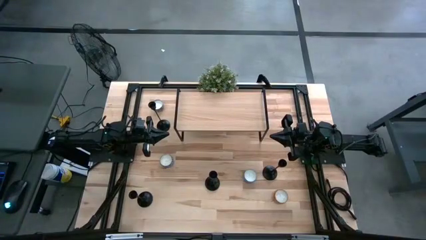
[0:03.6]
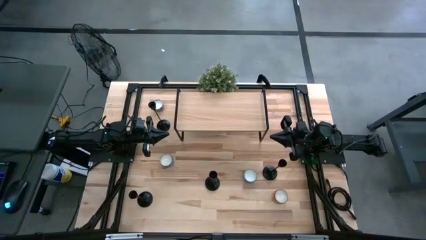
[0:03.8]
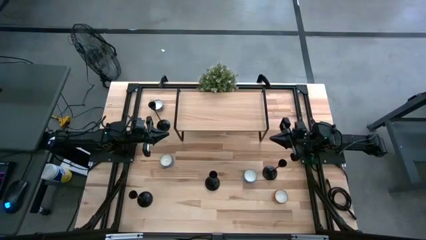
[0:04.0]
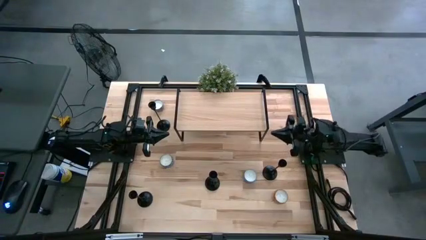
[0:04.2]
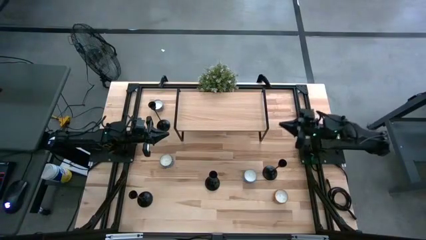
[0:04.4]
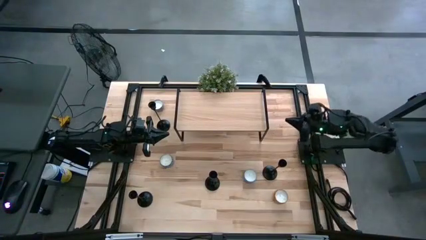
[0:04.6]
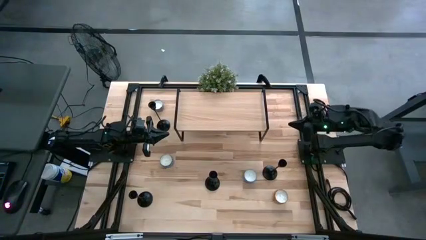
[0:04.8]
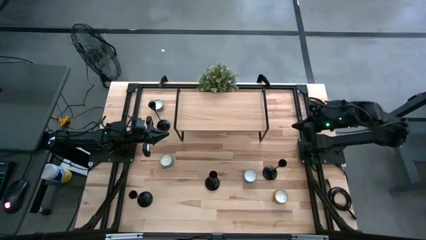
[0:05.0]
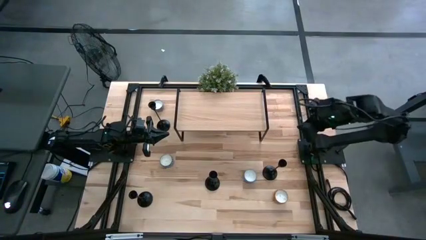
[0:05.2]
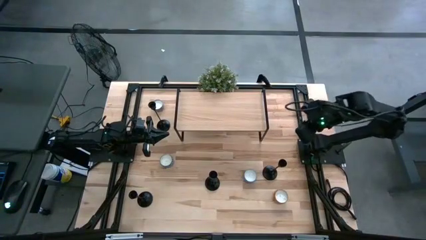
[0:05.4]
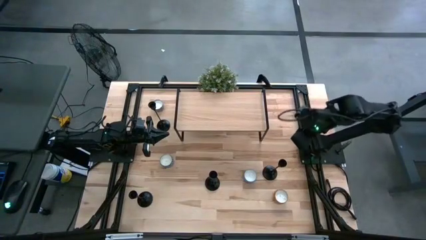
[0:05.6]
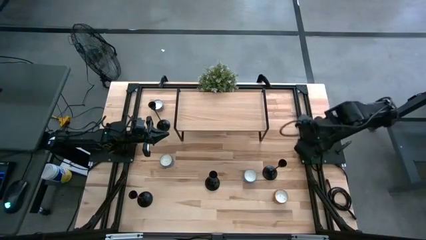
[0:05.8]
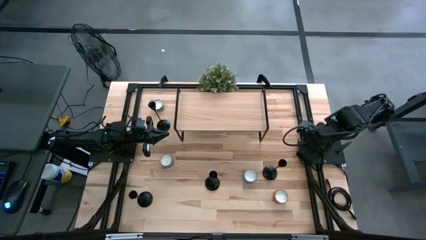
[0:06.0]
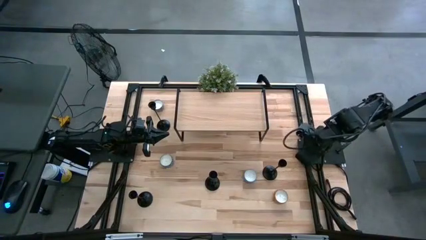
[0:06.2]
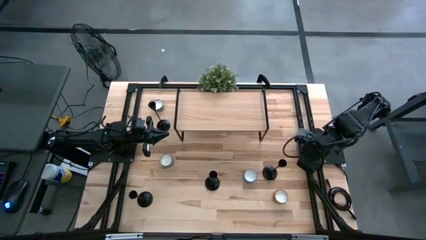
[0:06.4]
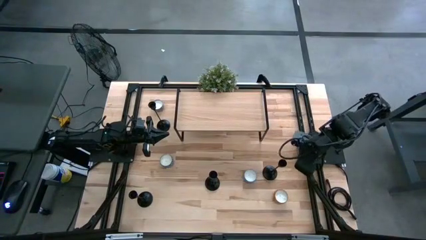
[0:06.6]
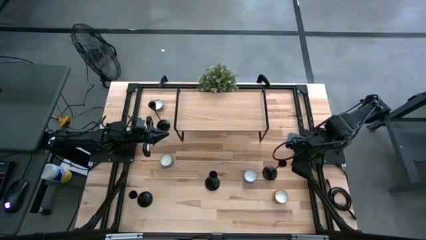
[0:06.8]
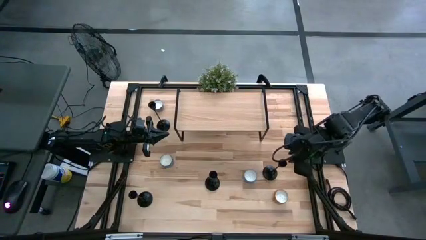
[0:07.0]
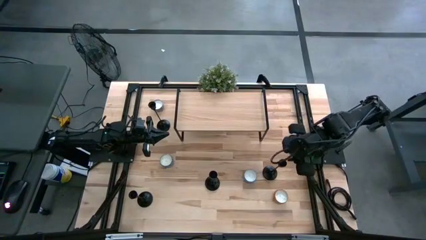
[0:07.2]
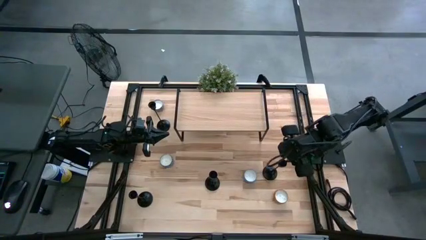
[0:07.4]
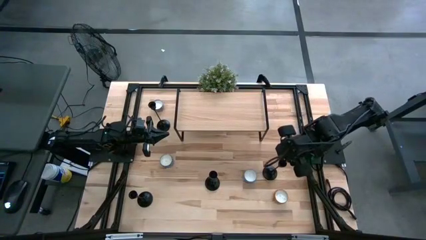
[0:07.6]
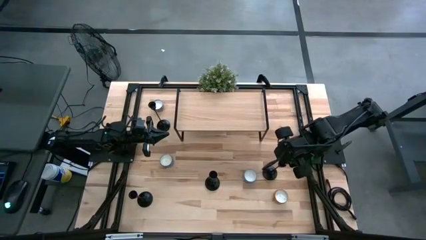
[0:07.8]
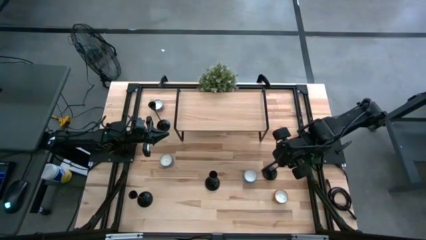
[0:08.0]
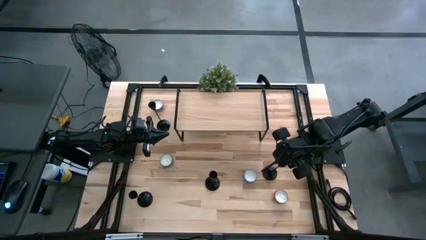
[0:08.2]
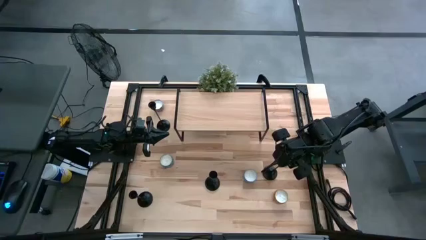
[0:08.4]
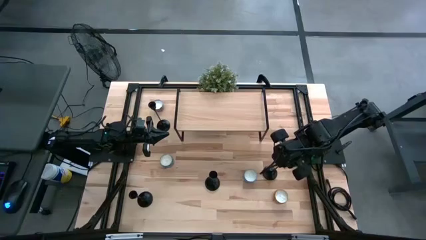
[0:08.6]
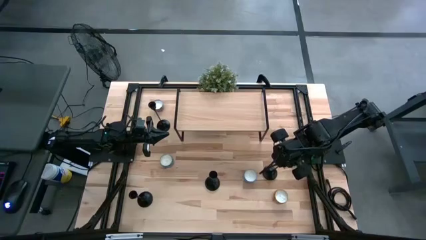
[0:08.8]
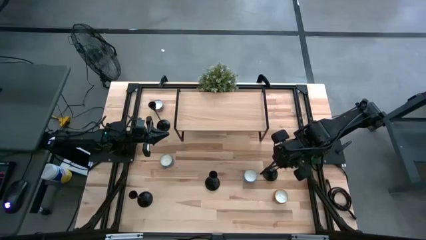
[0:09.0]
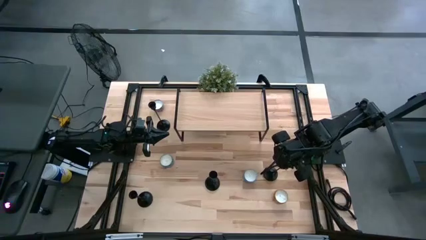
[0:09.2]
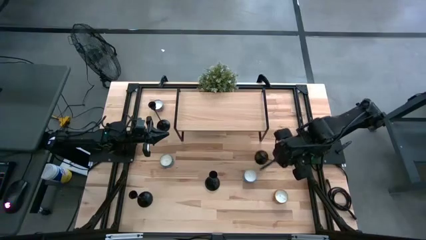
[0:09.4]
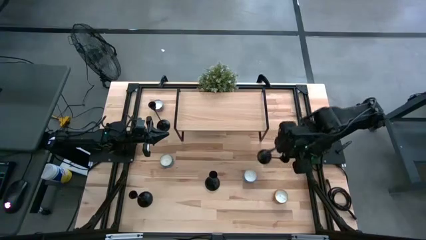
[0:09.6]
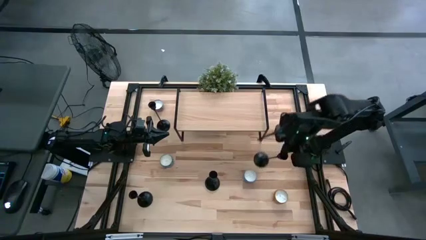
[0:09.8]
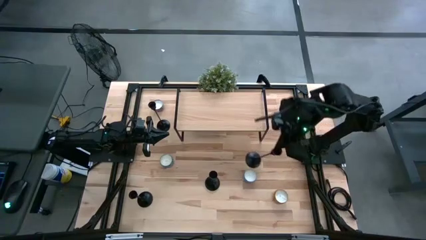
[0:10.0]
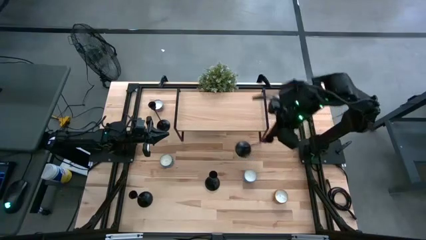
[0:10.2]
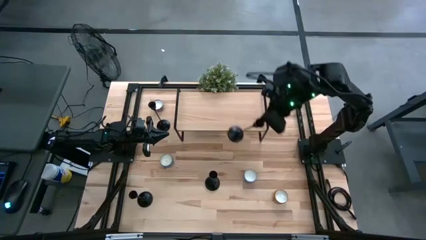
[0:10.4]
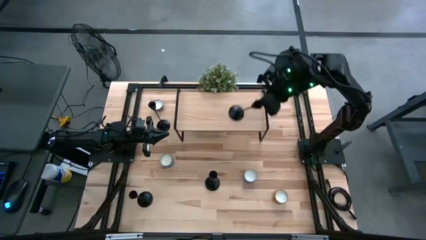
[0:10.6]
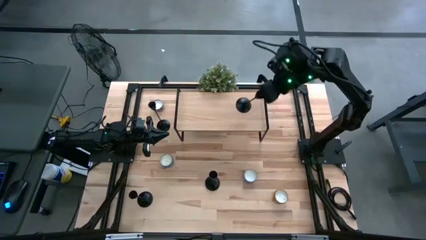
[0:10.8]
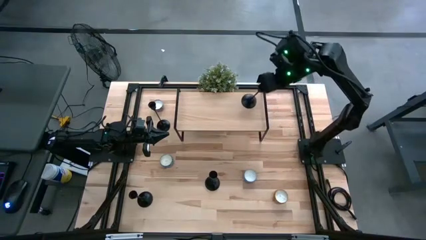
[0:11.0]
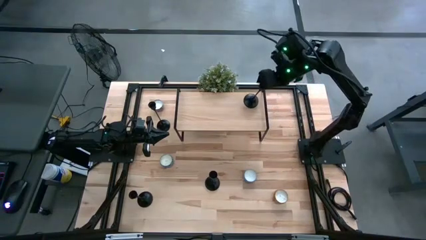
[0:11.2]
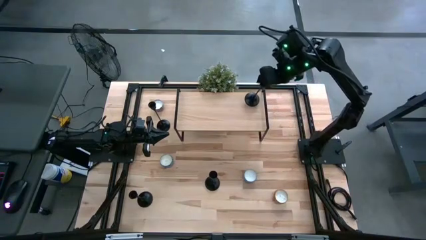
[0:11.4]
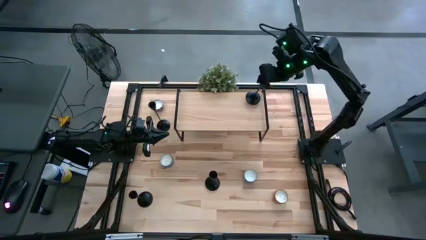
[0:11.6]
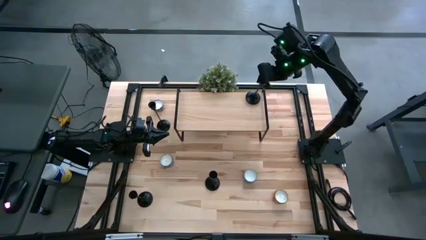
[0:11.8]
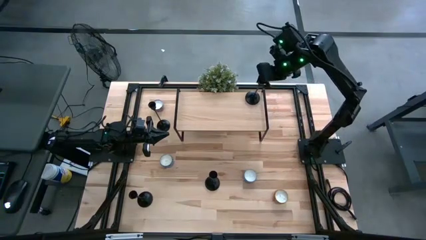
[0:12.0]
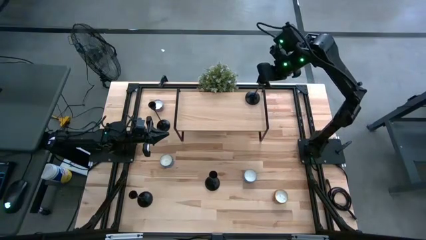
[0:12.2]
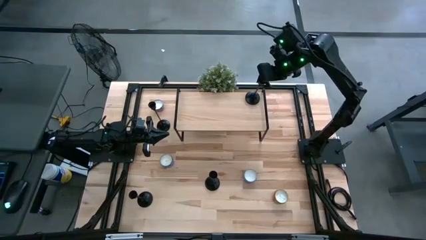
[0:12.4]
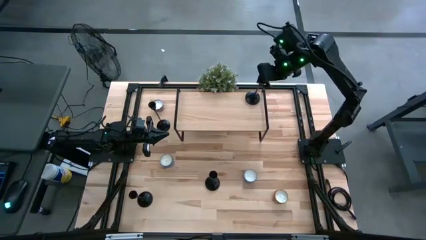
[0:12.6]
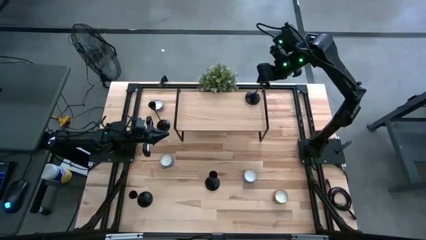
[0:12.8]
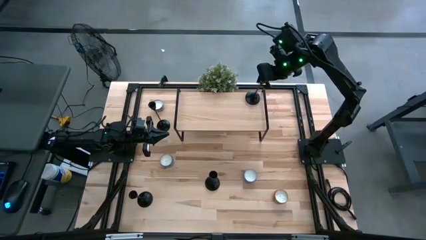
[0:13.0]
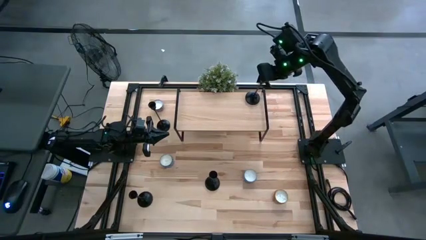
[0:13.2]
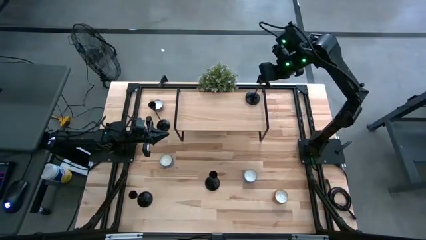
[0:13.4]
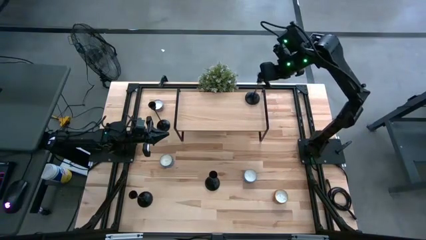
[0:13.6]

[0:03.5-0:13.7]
Task: Pick & Place candle stick holders
Put the black candle holder on the shelf

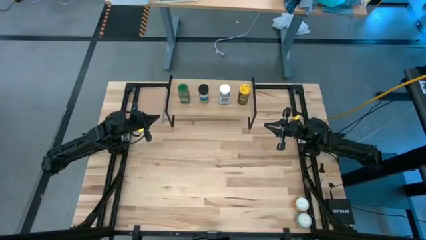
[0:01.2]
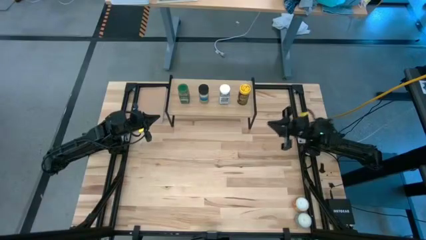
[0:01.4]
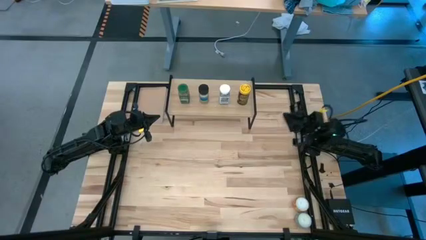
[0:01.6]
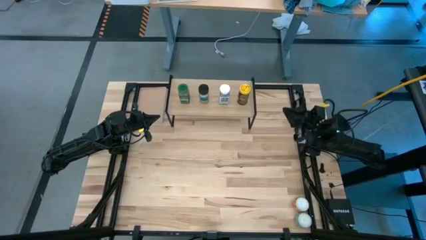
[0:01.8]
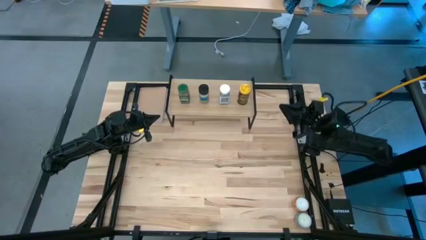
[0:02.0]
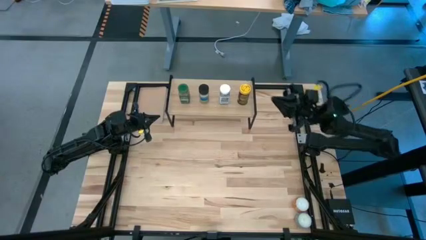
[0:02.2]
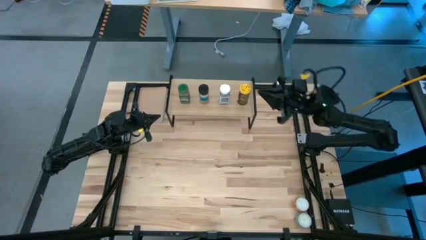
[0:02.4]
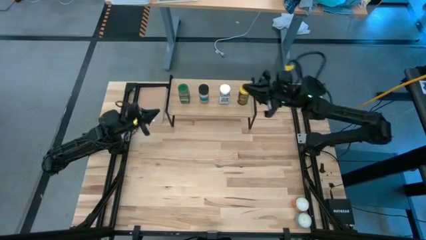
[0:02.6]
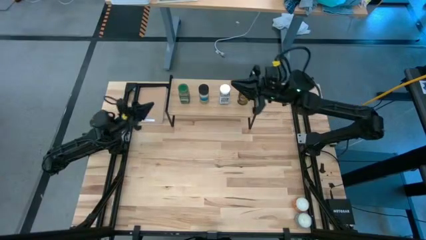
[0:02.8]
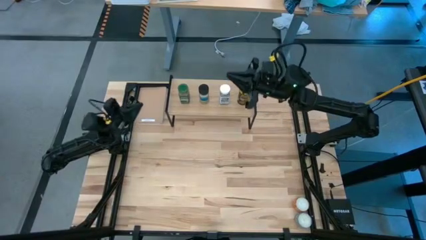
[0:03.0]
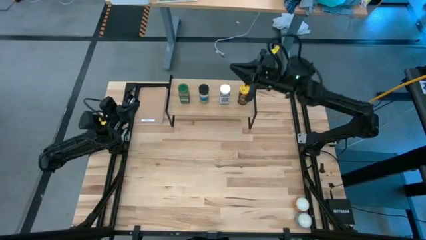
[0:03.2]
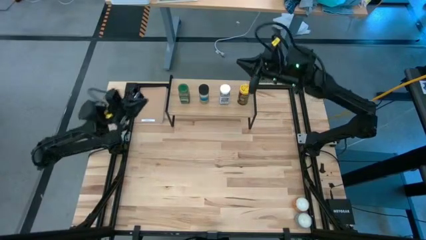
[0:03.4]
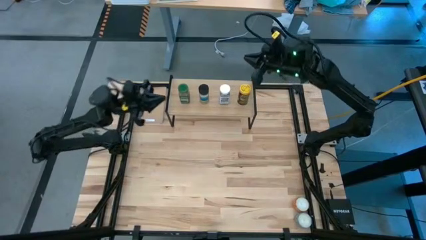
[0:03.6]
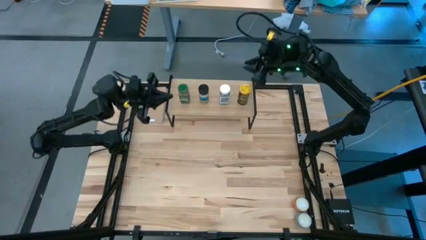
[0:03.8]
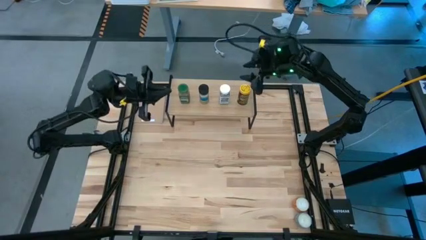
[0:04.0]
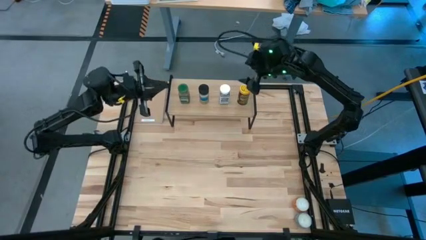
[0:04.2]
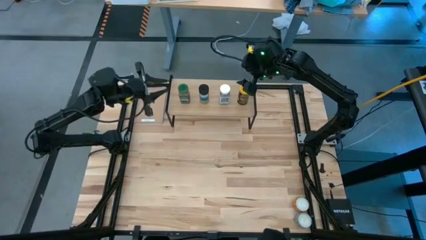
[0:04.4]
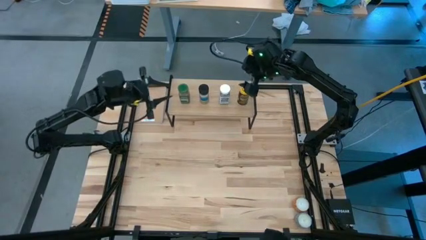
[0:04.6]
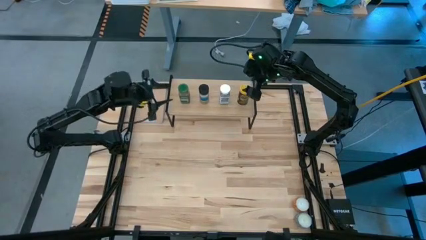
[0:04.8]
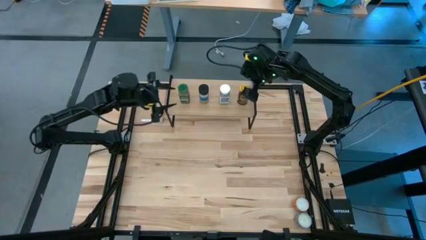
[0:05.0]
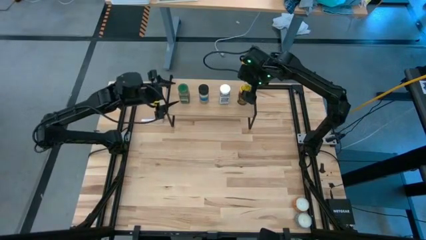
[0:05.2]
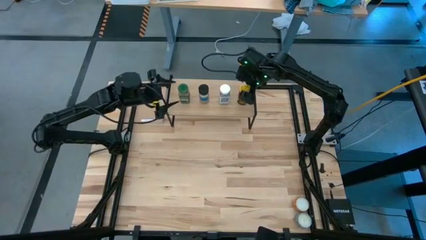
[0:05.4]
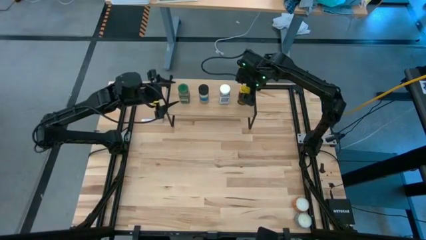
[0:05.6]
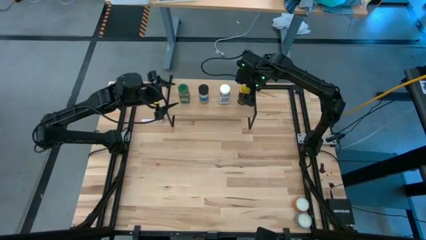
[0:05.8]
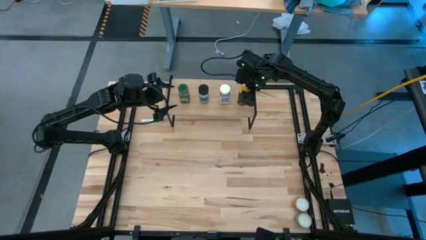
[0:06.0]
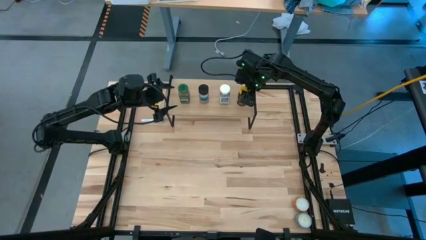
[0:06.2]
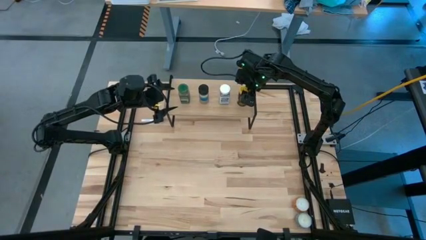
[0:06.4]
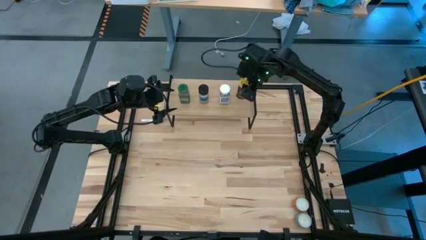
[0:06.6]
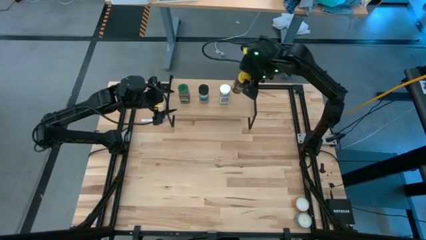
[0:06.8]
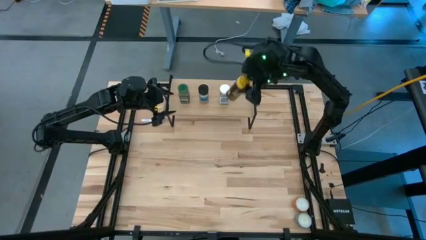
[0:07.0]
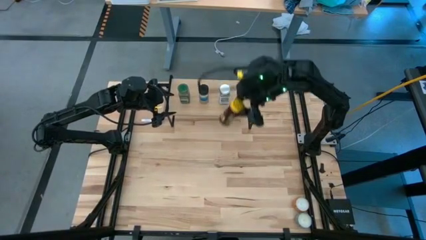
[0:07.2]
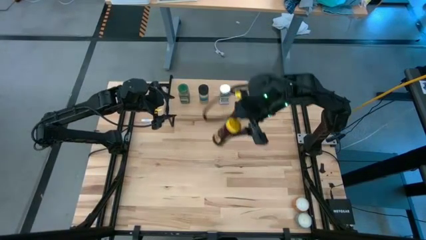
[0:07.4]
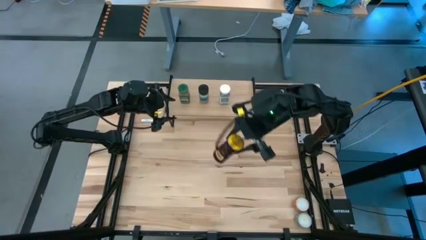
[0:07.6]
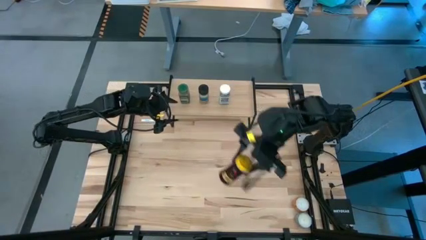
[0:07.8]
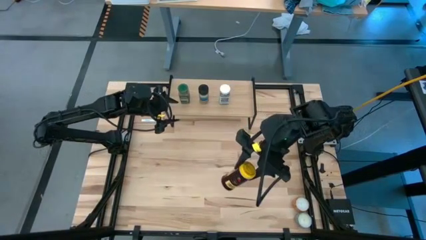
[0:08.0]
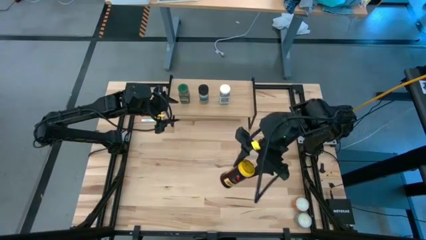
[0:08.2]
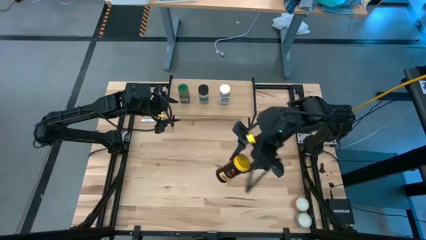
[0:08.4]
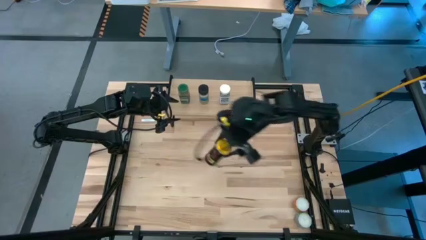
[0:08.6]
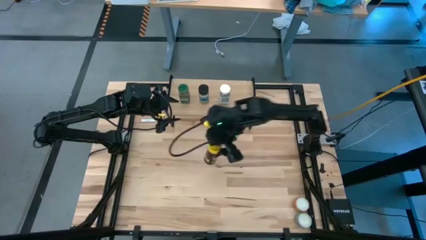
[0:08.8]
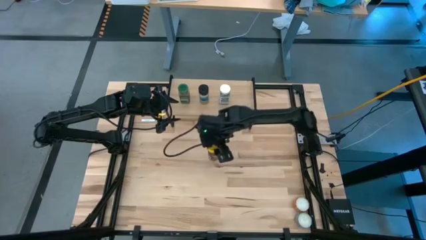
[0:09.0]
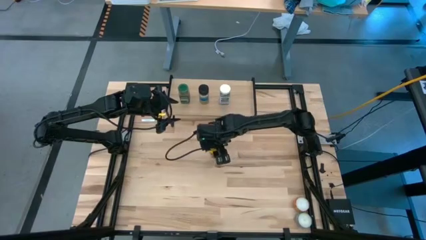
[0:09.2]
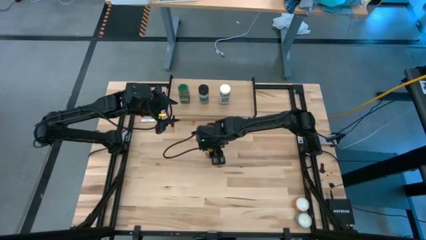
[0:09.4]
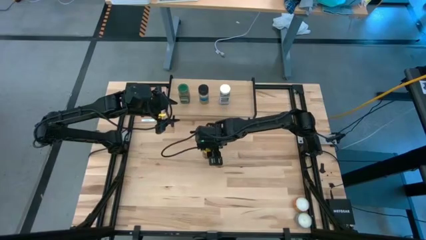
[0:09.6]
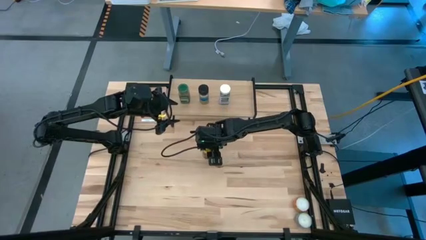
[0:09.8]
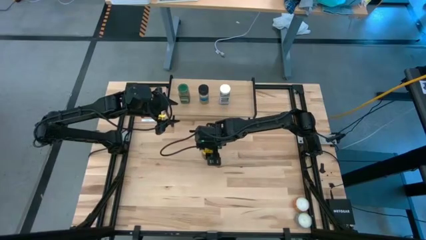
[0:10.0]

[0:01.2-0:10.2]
Task: Shelf spices
Remove the yellow seasoning bottle from the shelf
